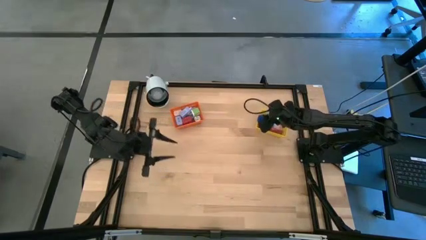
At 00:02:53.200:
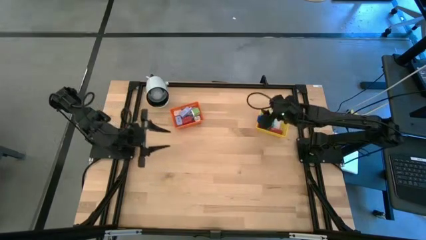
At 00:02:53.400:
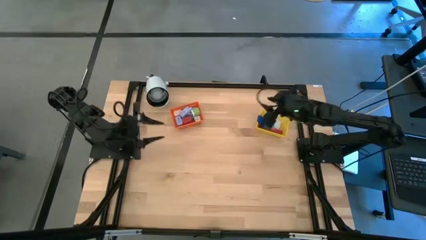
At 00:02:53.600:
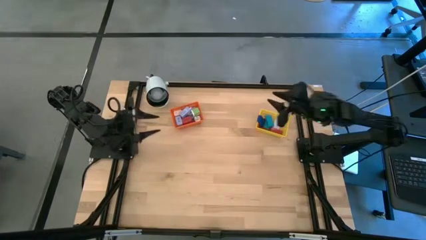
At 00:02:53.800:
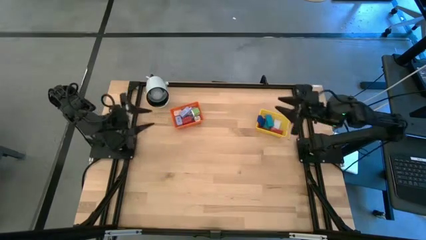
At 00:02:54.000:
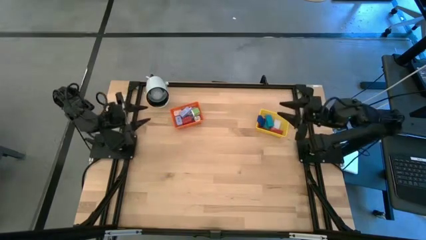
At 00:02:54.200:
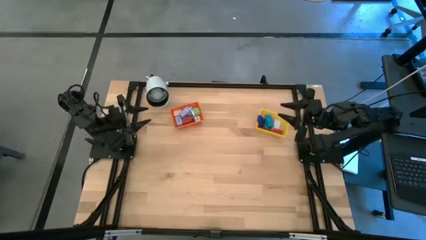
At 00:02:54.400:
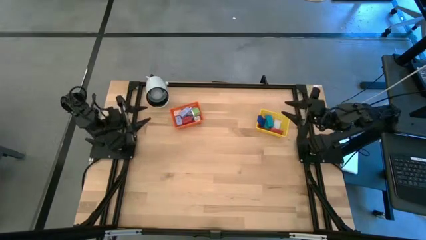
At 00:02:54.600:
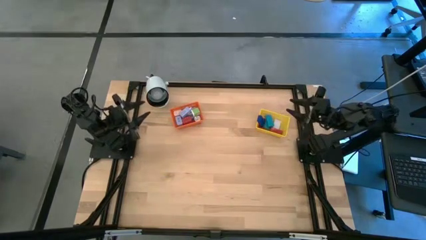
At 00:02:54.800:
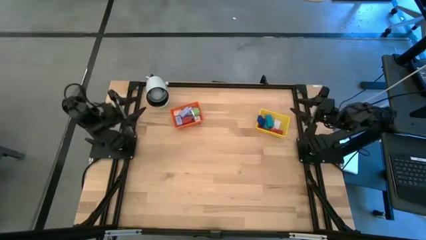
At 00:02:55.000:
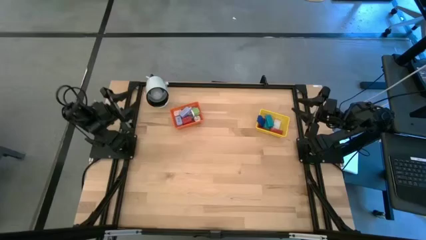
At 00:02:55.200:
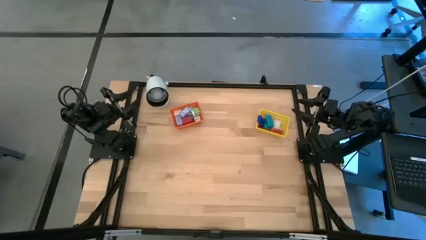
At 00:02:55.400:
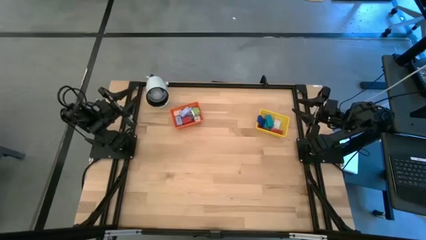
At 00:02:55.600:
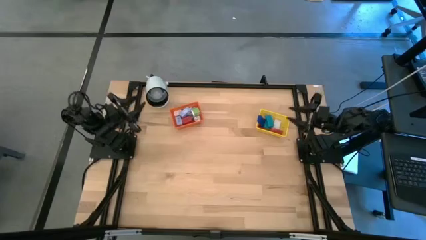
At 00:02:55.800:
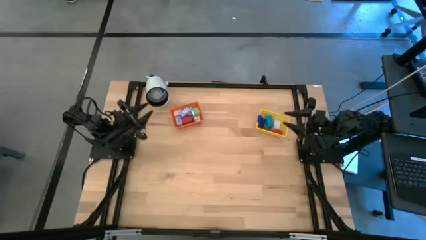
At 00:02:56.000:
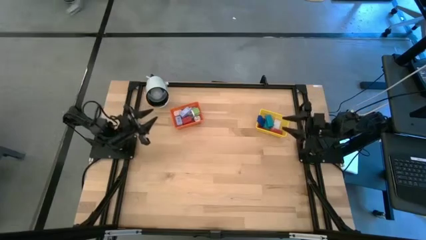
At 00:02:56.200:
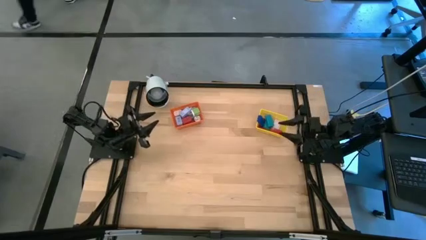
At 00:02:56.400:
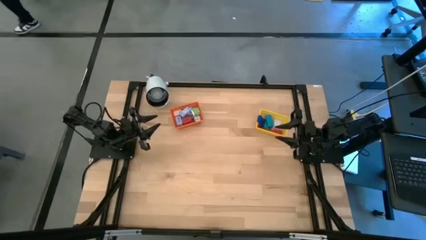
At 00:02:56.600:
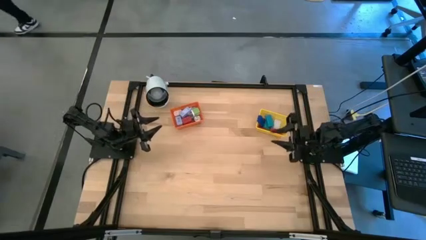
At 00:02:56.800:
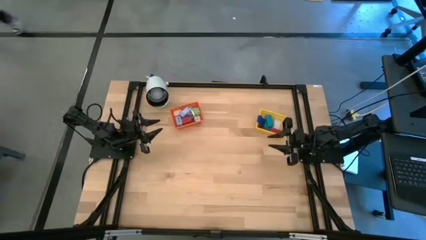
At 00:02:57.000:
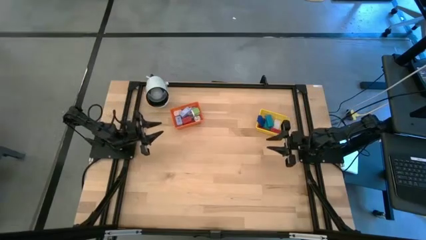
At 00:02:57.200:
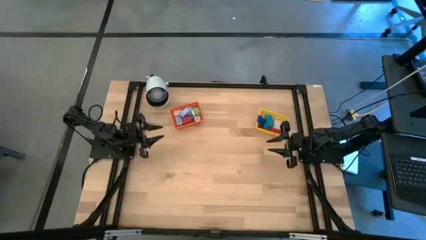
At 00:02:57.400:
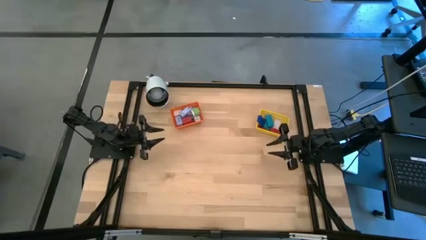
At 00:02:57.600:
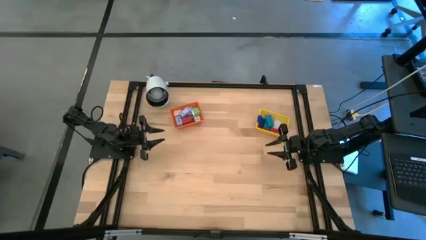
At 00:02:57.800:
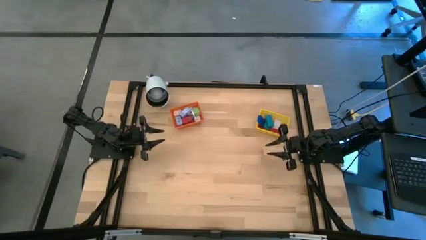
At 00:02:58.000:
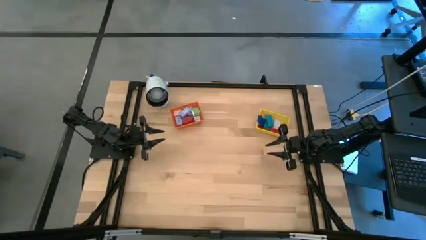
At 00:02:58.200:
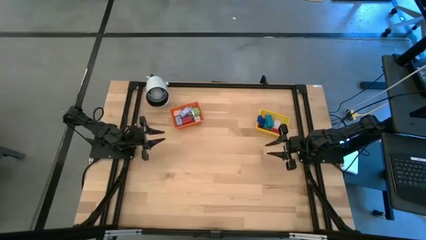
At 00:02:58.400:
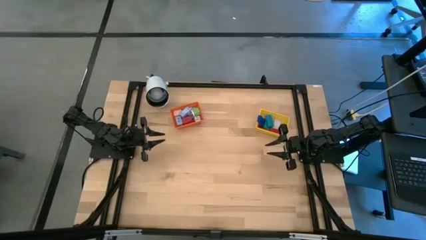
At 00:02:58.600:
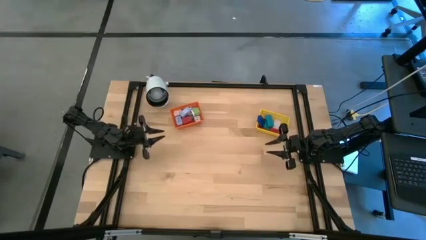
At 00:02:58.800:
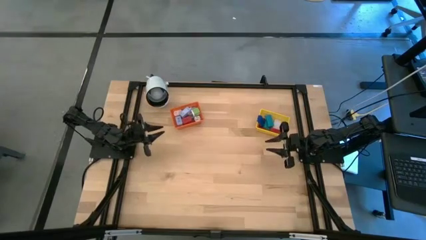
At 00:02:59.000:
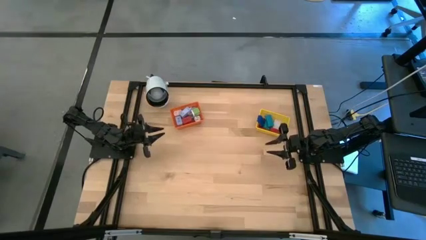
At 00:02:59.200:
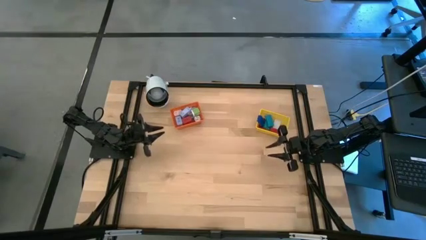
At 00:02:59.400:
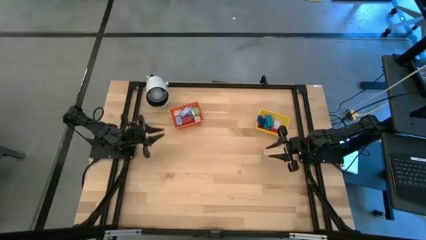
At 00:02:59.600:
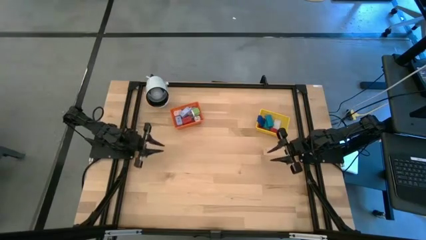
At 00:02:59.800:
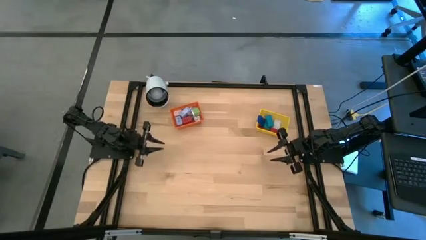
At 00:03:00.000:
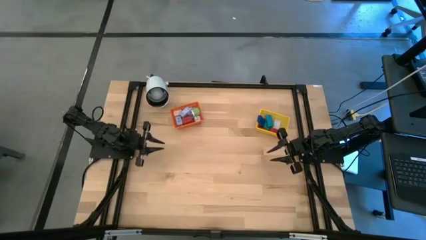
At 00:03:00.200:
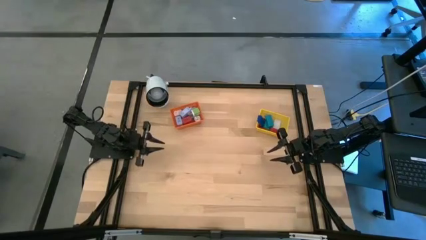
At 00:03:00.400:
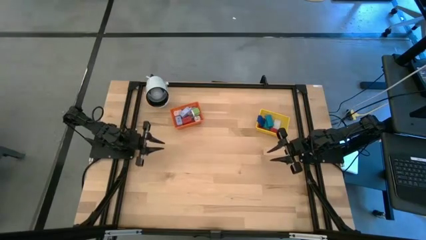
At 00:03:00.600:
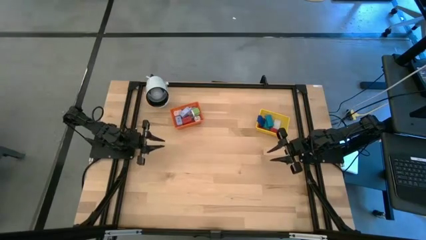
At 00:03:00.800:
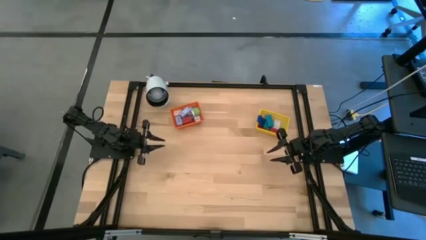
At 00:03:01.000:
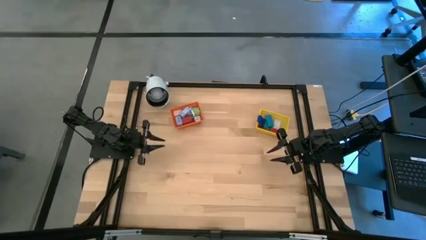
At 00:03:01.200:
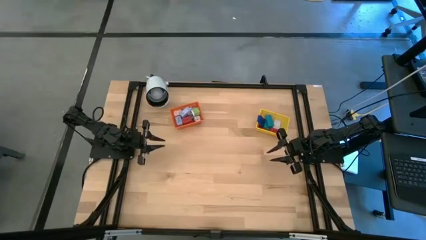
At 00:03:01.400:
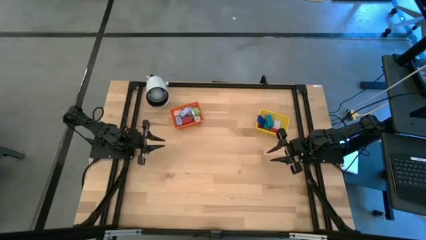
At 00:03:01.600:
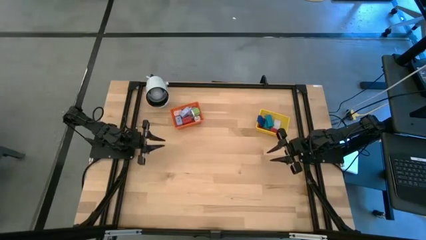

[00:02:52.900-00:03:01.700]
Task: Pick & Place Office items
Return to Home Position

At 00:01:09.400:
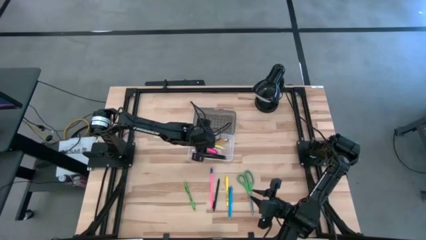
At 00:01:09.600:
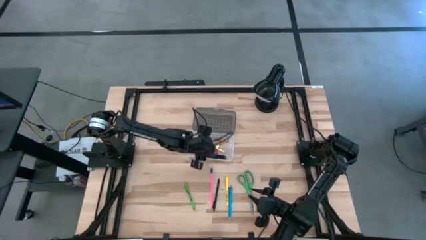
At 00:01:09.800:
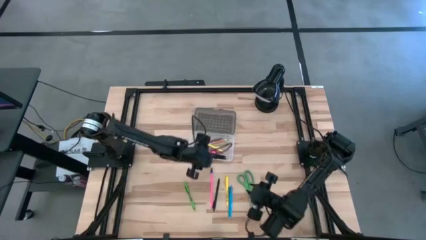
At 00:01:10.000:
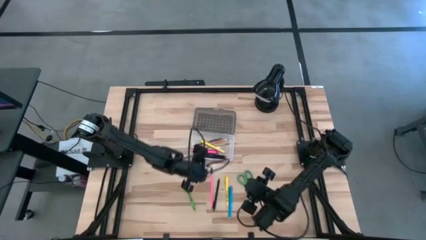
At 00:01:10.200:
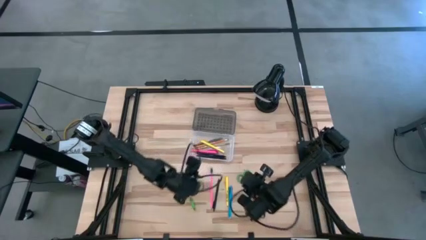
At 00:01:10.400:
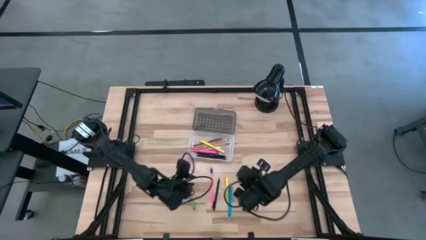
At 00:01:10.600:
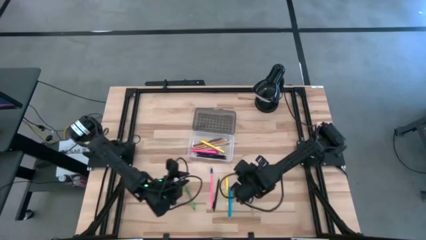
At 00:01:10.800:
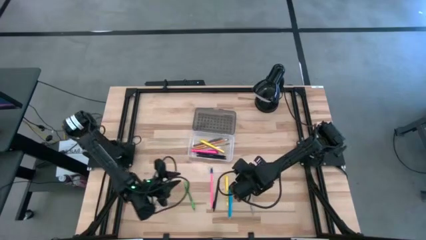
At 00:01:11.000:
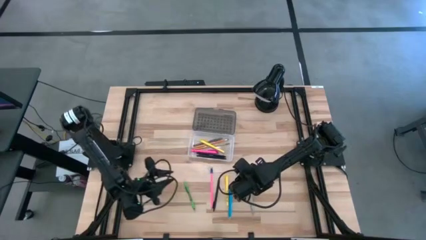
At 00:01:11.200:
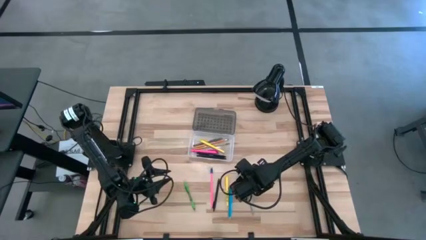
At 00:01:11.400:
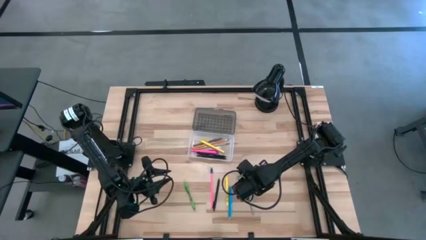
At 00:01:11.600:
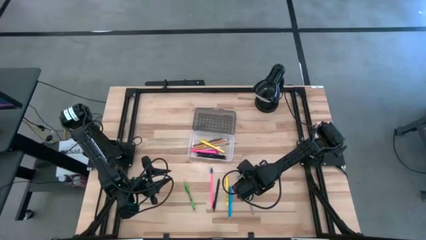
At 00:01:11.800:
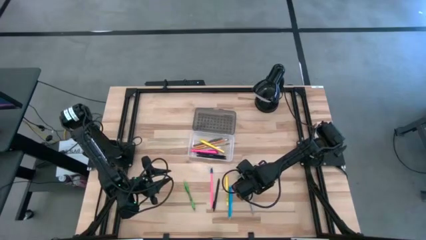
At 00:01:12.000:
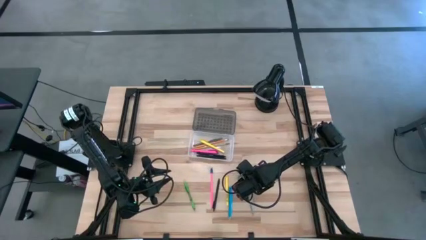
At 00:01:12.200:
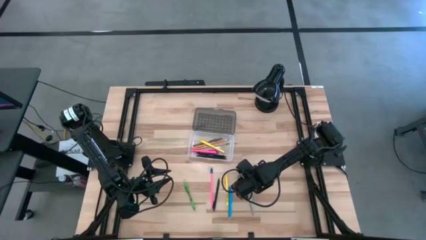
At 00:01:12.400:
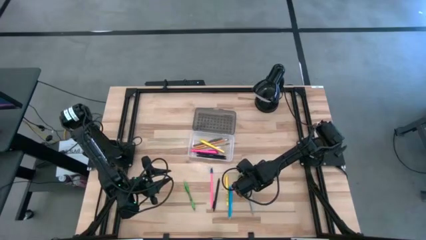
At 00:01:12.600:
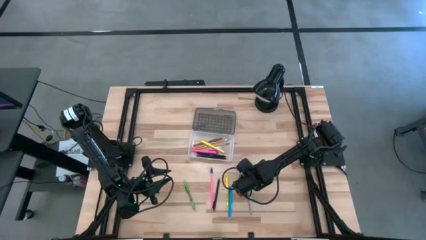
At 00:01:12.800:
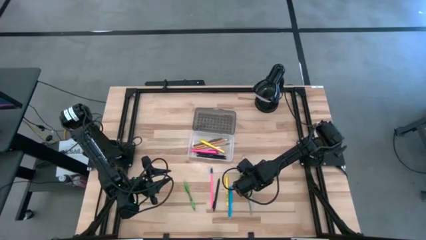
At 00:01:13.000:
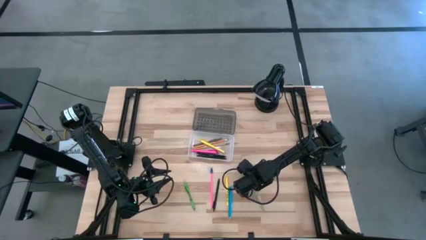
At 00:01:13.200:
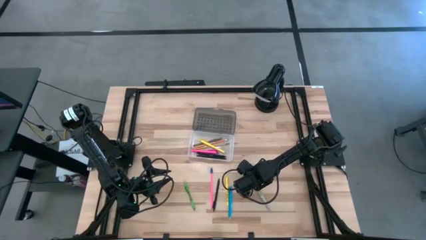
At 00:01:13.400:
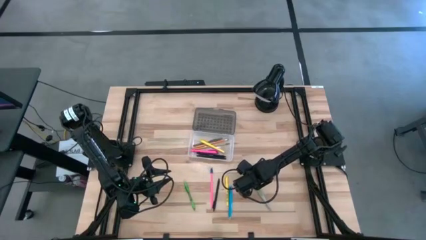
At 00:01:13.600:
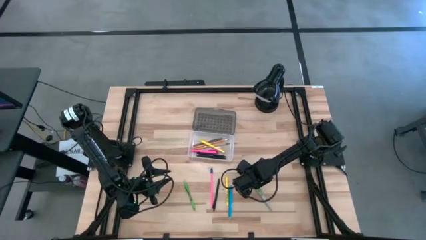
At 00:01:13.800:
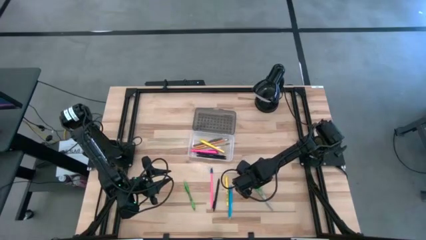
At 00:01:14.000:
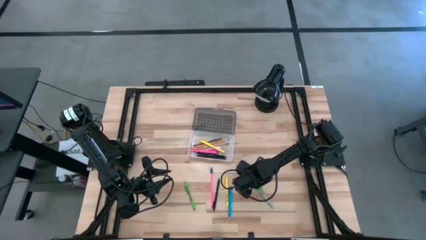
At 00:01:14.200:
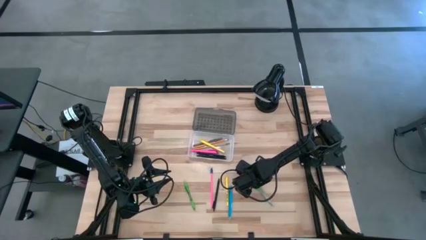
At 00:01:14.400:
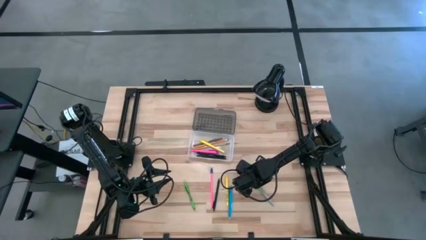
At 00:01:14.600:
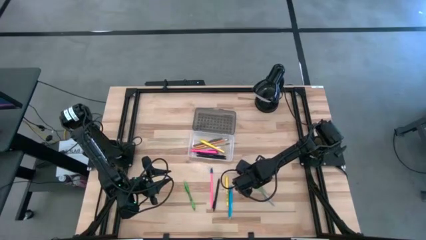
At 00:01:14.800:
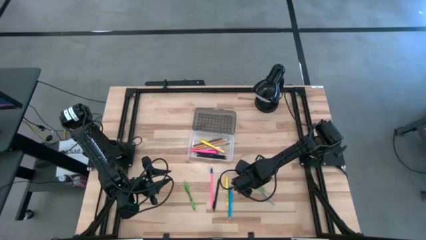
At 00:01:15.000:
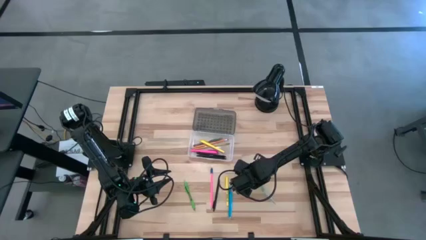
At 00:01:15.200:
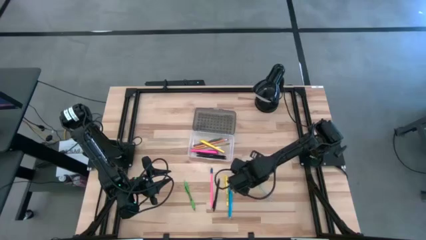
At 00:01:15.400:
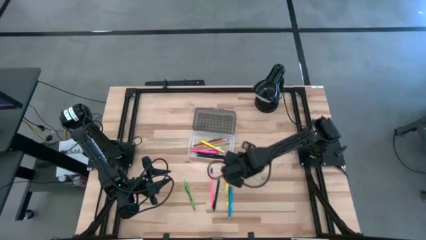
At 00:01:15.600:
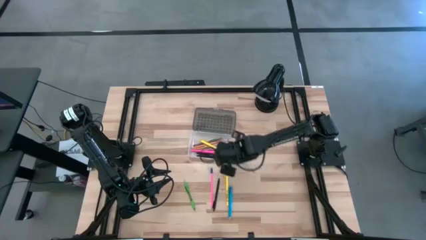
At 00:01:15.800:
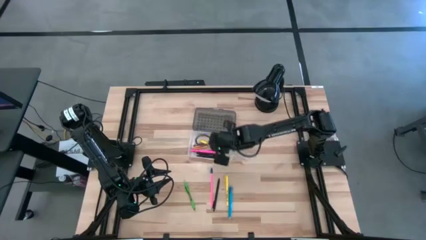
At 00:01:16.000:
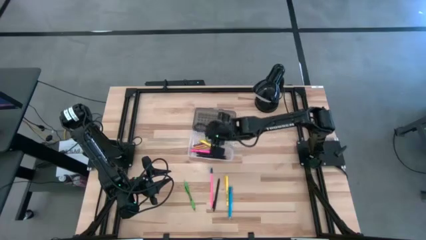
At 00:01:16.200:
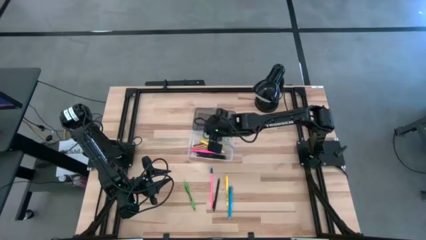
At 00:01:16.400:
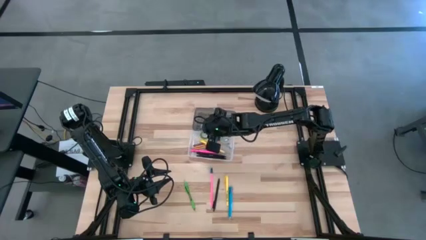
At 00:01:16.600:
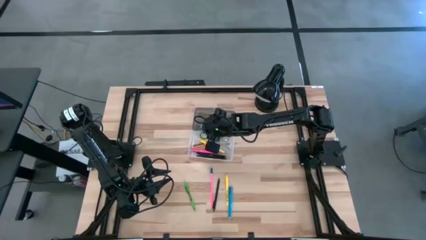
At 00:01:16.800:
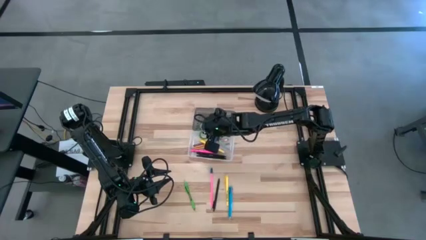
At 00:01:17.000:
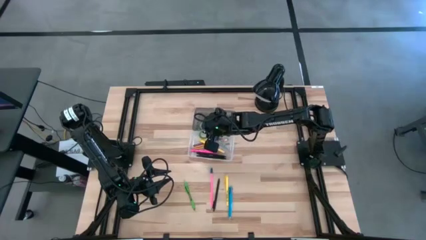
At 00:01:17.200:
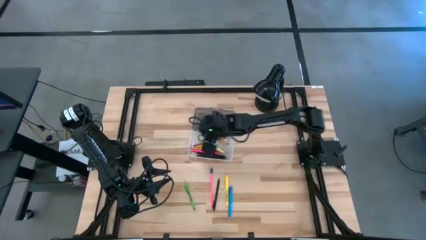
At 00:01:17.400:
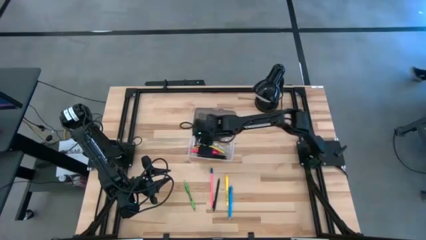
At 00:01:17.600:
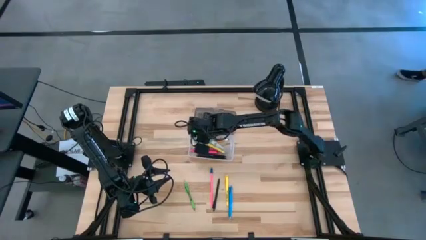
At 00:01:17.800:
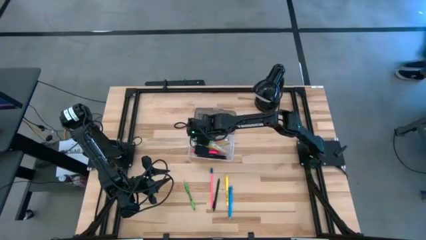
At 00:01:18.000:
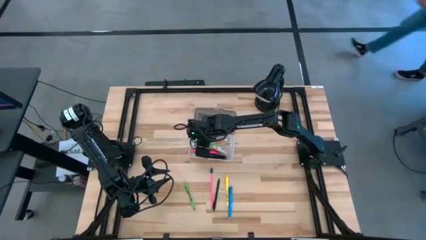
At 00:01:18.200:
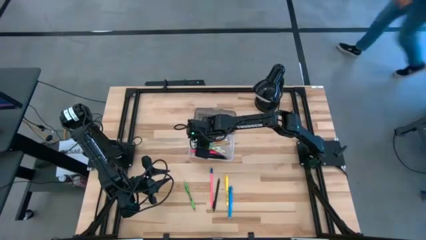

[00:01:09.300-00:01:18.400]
Task: Pick & place school supplies into a supply box
Put the green scissors into the transparent supply box
